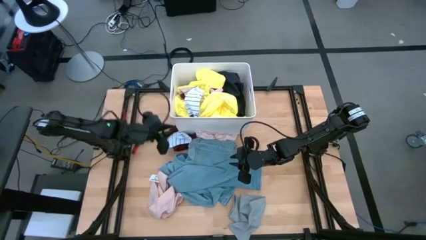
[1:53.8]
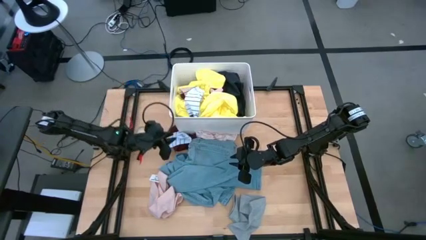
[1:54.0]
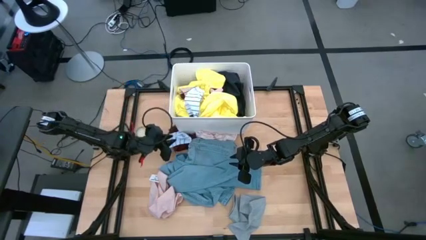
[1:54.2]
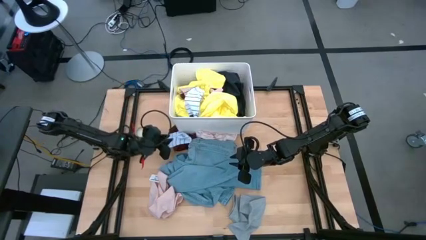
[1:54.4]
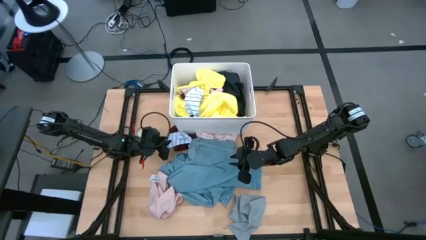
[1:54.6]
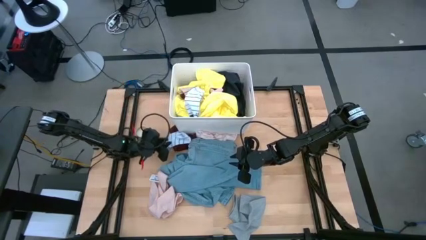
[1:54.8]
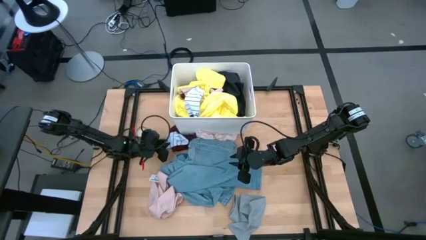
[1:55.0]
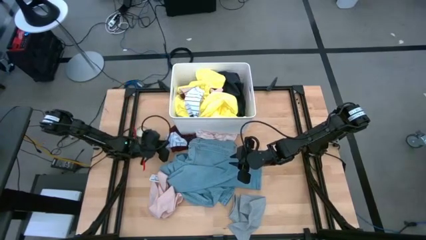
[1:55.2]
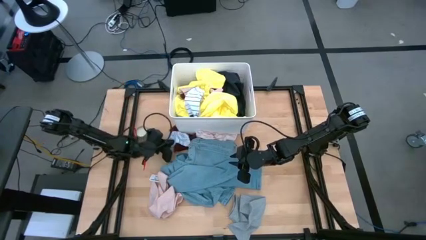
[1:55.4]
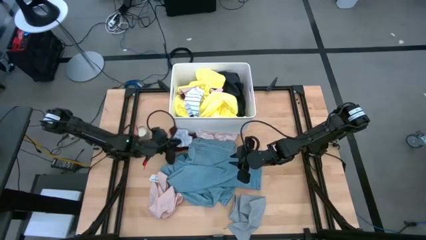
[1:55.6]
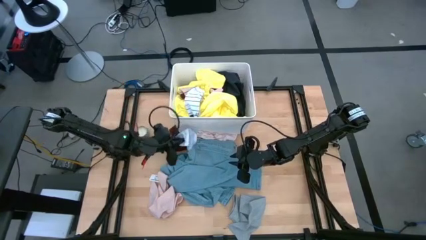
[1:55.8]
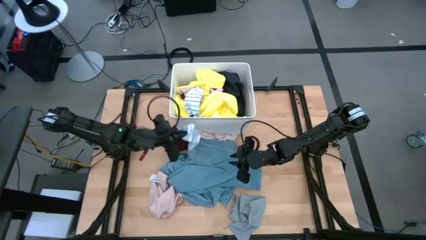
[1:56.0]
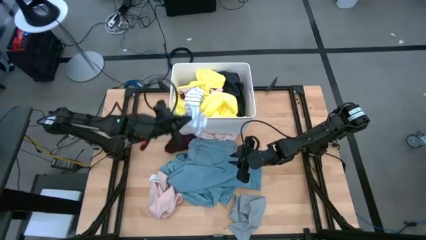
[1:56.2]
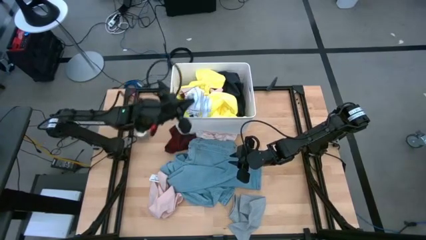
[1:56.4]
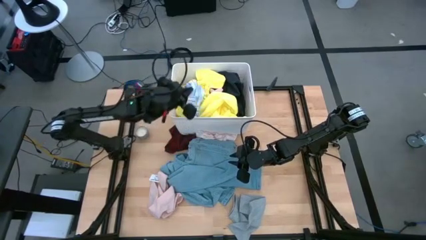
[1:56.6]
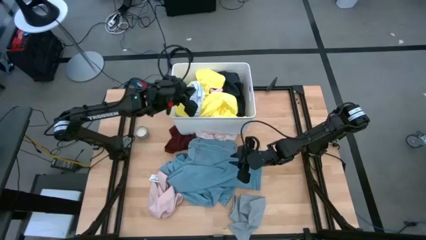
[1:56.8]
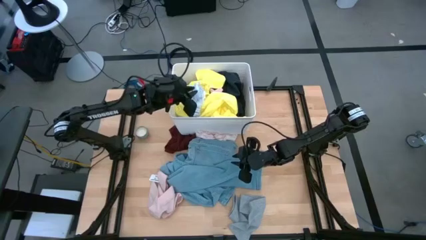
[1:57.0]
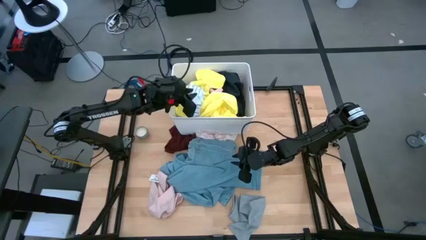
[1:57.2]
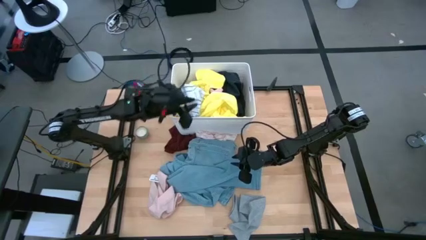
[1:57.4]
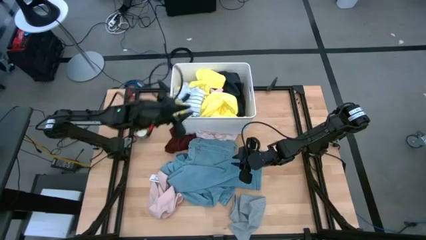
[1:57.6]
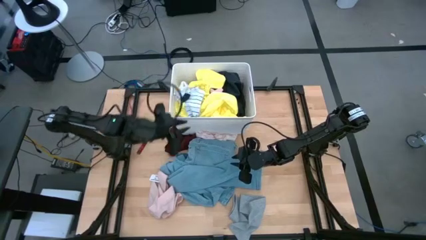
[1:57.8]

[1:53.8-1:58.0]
Task: Sort clothes
Put the blue striped sock into the white laundry bin

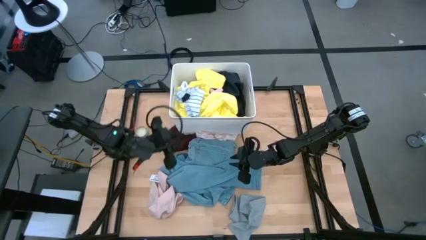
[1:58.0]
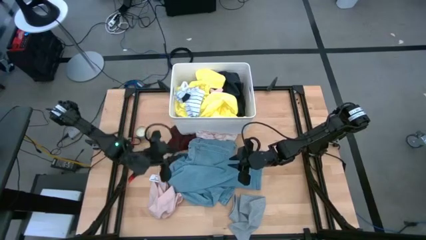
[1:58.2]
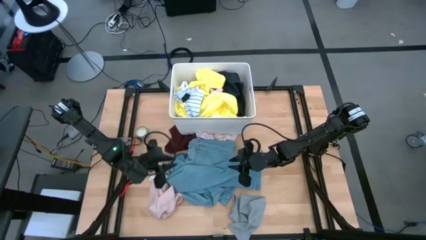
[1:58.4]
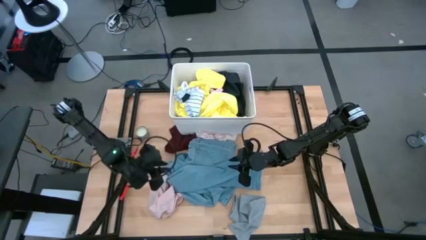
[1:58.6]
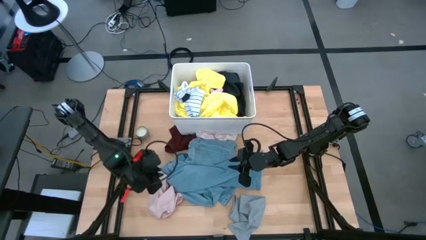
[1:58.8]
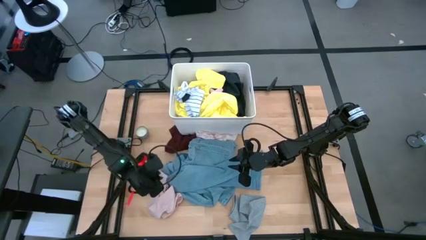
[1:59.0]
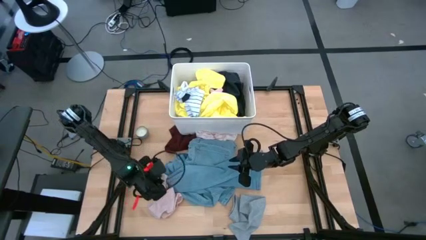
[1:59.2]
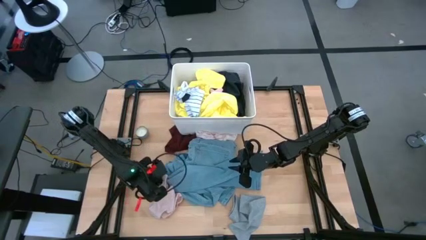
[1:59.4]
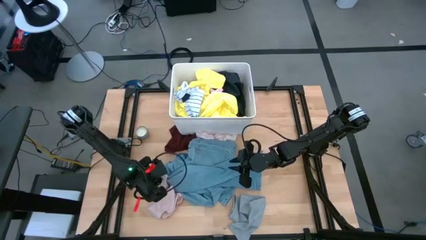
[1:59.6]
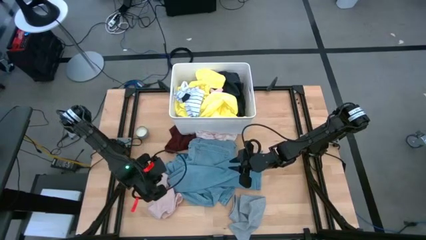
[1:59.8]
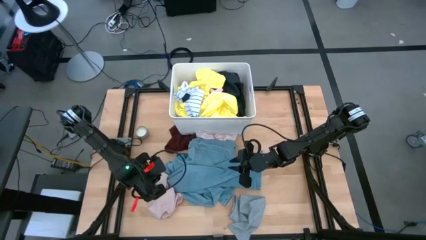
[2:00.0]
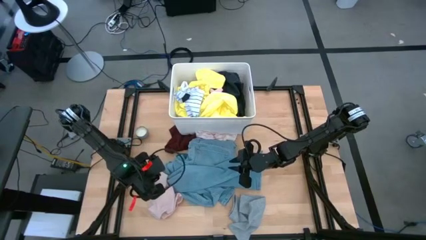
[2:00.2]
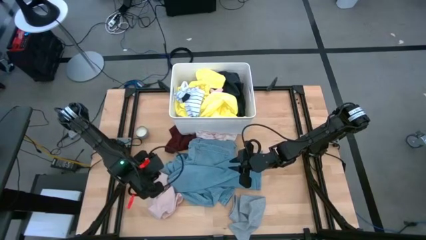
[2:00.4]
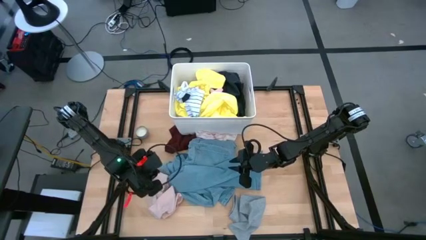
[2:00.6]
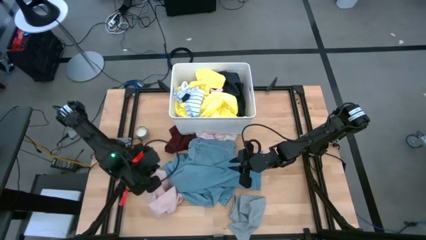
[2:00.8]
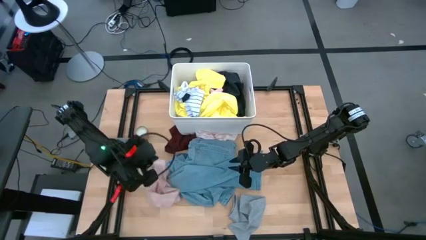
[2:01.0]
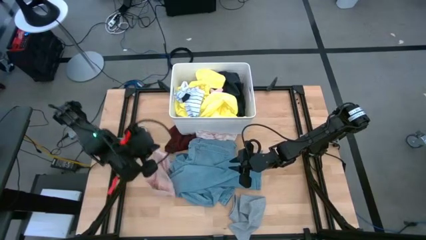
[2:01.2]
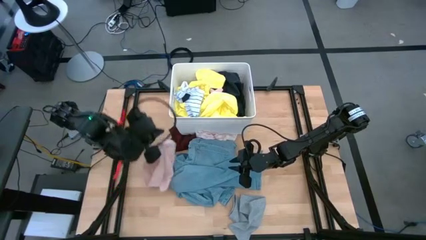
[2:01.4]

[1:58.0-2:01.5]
Put the pink underwear into the white laundry bin

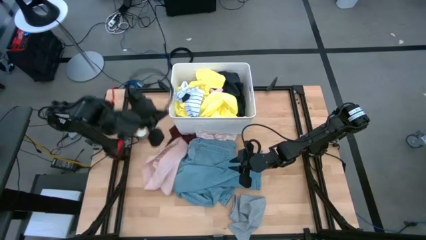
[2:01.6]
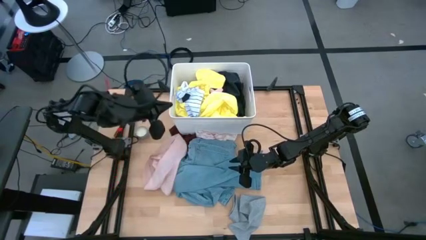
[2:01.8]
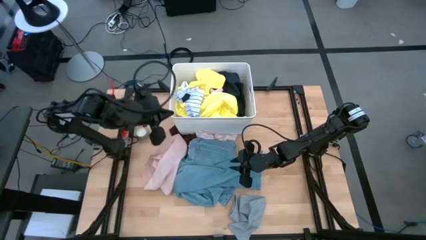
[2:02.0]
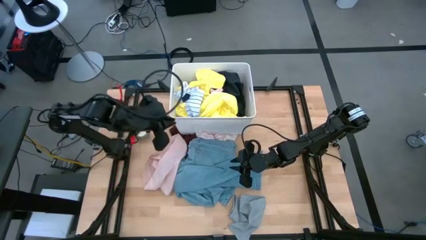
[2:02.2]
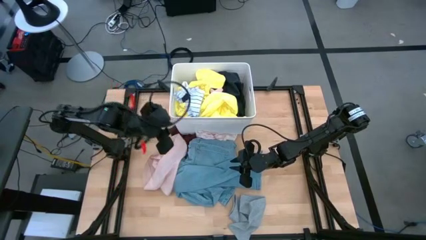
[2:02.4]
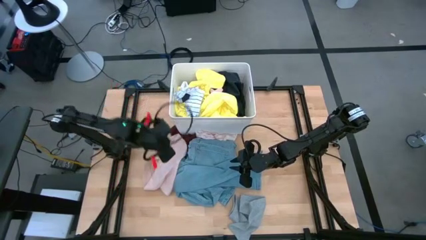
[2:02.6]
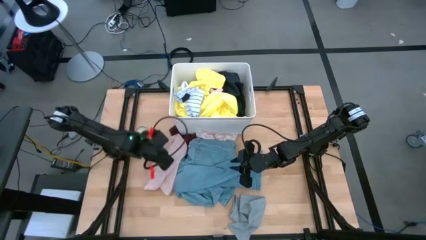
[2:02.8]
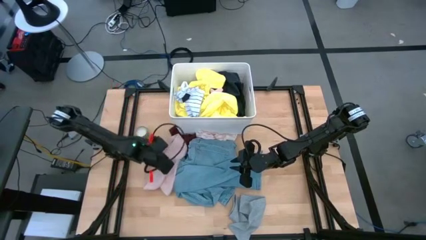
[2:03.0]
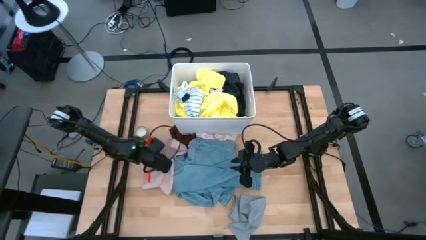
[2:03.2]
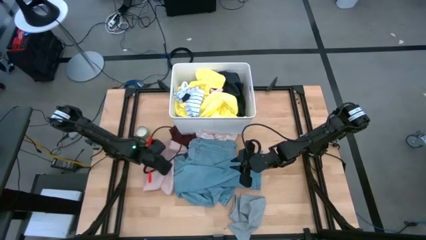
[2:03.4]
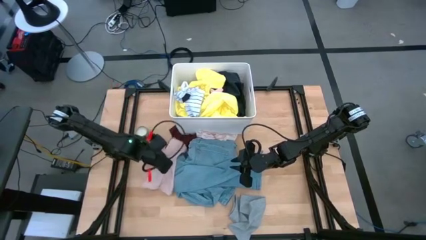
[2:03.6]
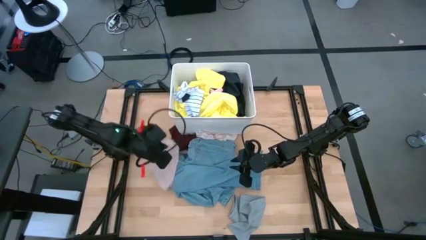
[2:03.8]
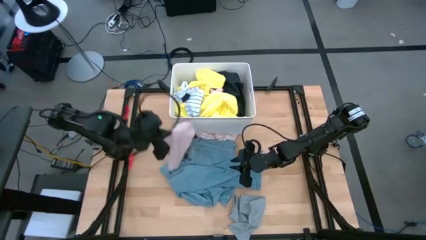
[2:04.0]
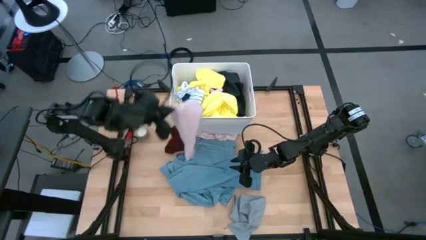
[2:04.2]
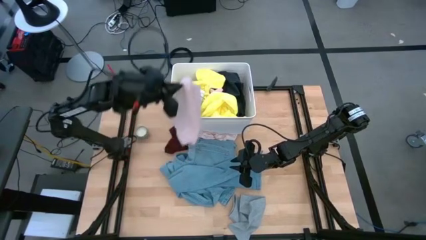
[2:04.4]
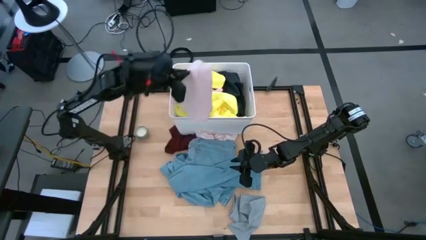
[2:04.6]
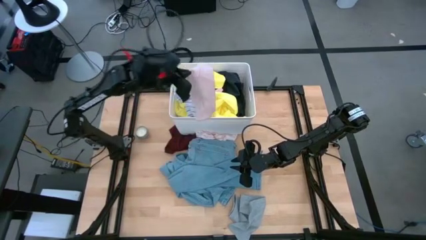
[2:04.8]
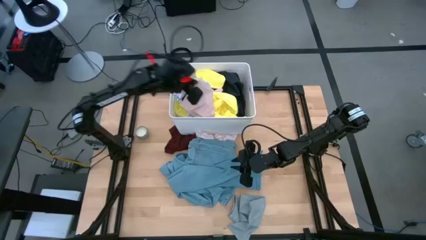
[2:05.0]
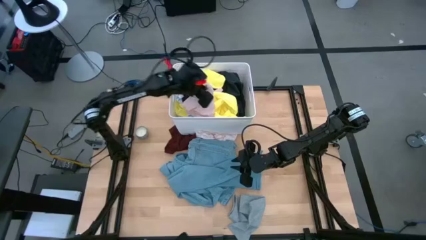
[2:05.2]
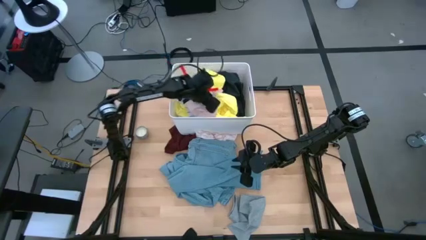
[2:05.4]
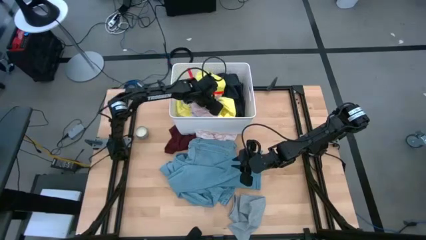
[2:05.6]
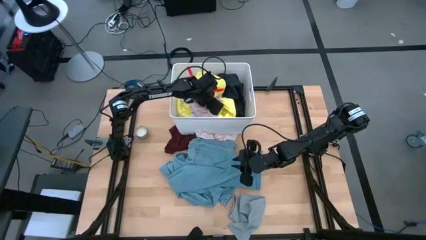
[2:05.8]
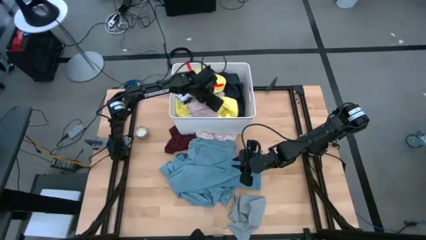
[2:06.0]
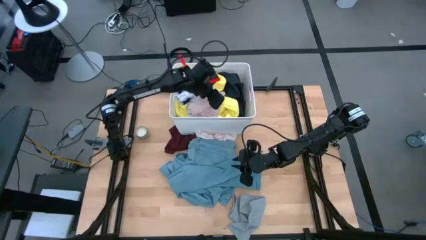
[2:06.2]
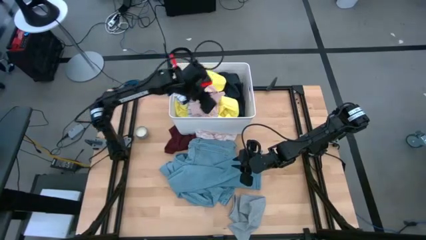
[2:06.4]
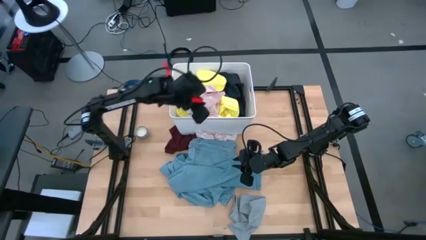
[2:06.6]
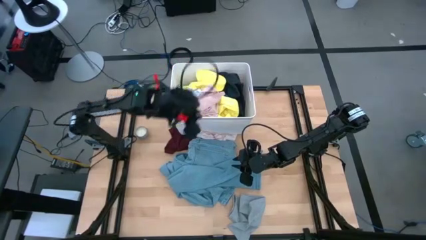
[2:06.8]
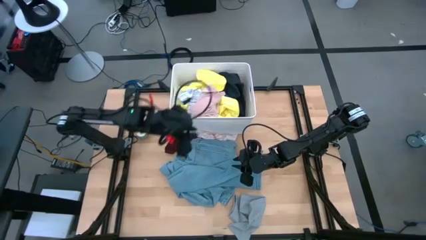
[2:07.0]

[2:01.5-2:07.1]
Put the pink underwear into the white laundry bin

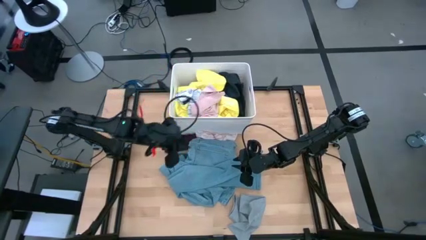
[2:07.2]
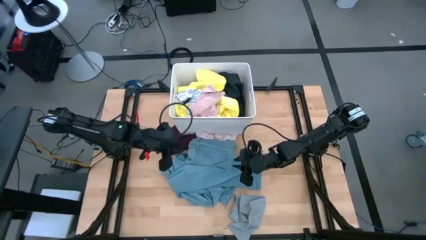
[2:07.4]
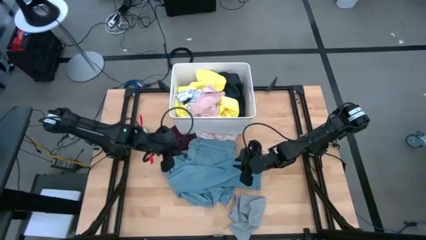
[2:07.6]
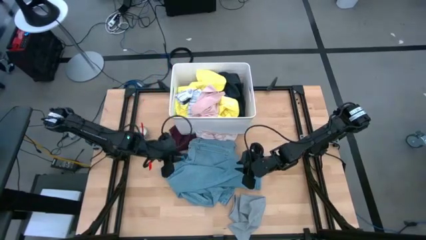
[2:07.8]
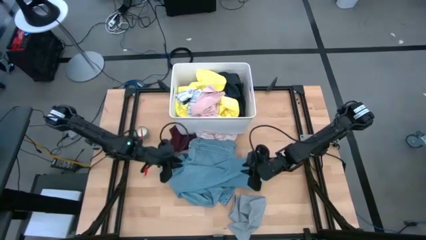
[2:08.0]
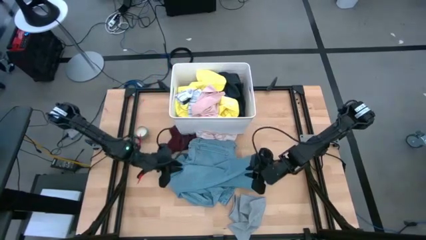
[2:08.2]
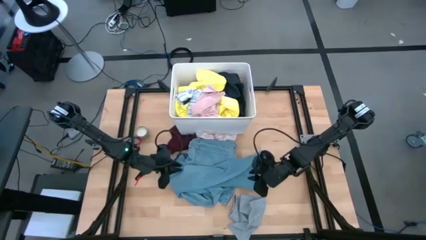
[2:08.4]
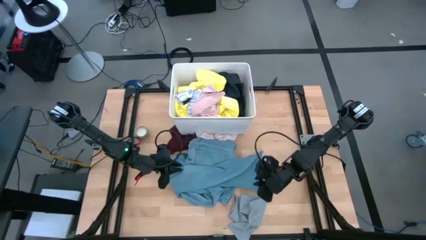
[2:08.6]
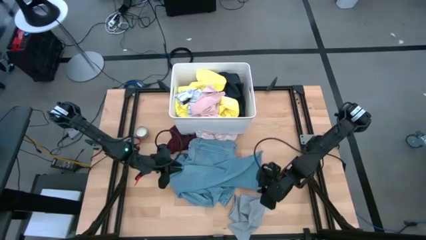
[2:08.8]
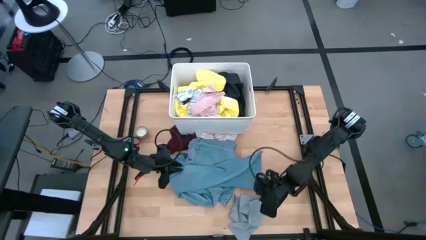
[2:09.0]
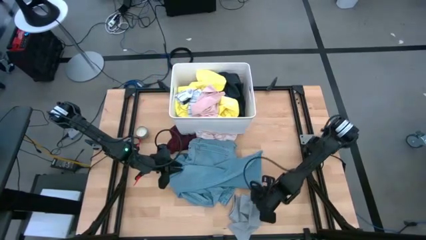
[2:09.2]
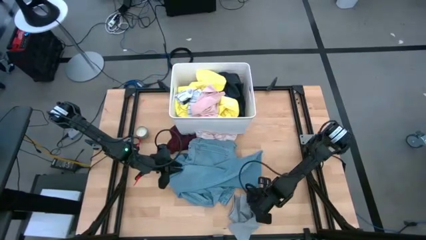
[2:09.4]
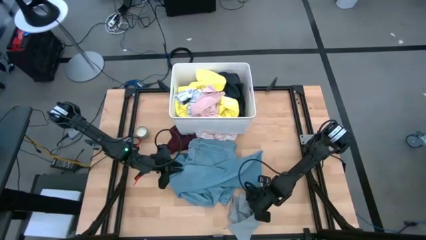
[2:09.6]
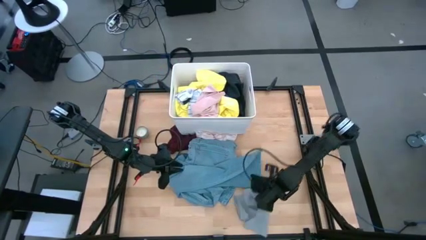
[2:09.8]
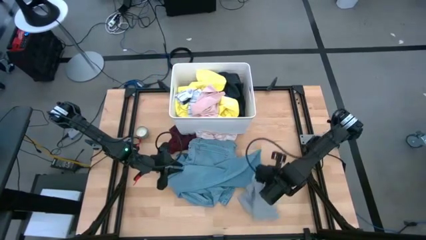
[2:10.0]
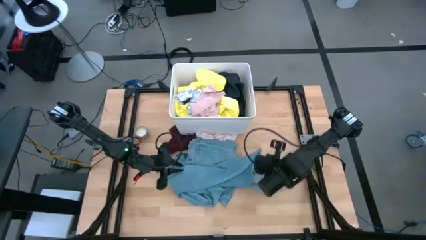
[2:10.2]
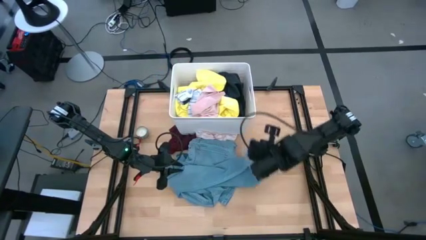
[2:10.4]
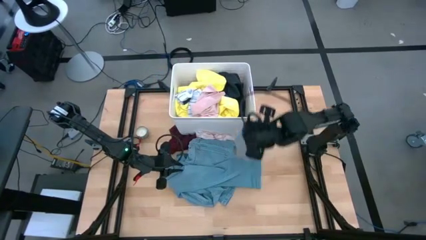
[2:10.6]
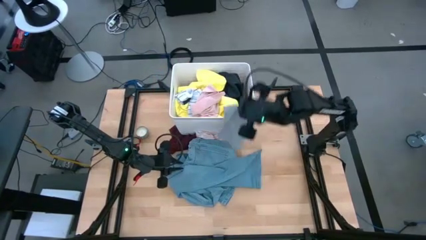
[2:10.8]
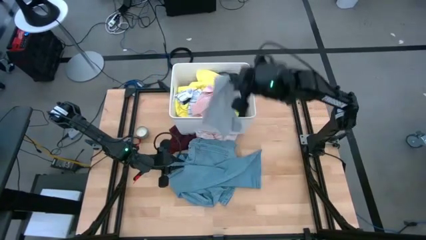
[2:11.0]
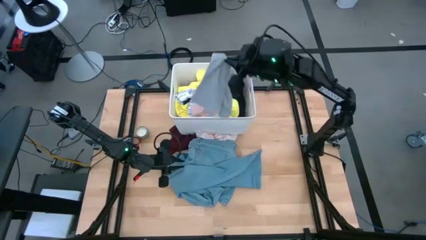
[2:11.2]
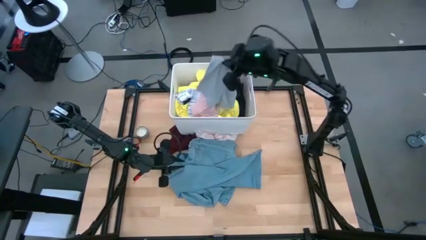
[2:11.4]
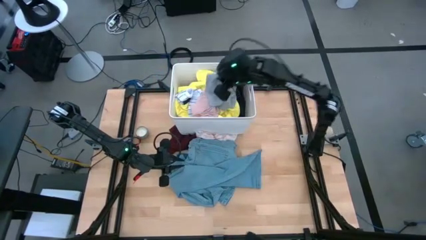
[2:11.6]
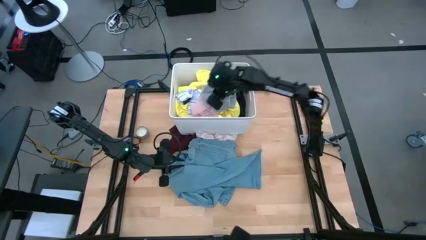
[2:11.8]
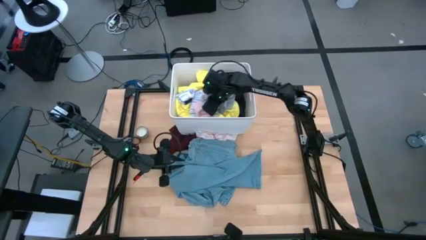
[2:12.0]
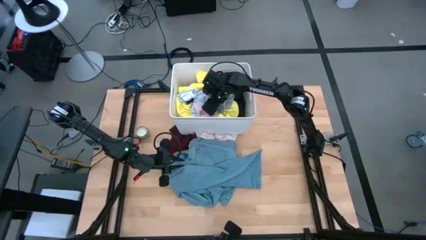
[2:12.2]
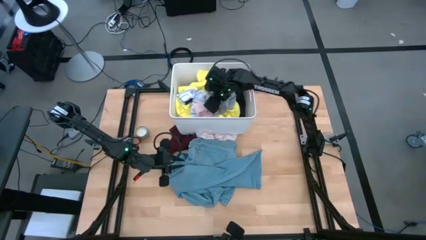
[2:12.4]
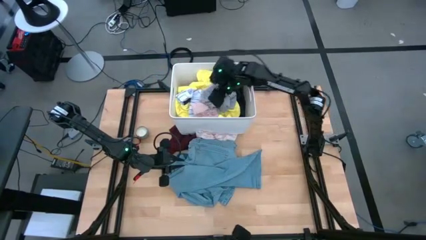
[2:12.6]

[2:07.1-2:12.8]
Put the gray shorts into the white laundry bin
